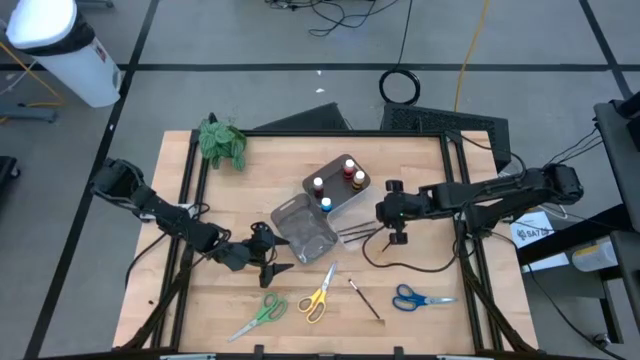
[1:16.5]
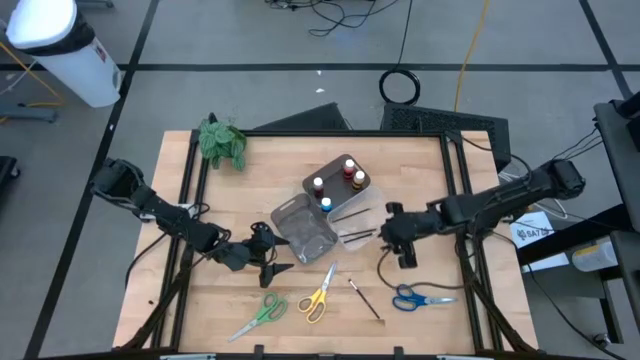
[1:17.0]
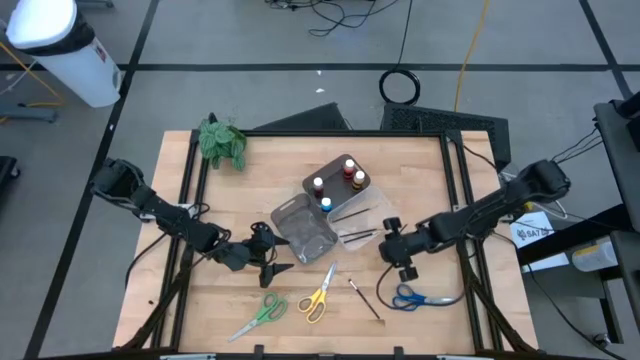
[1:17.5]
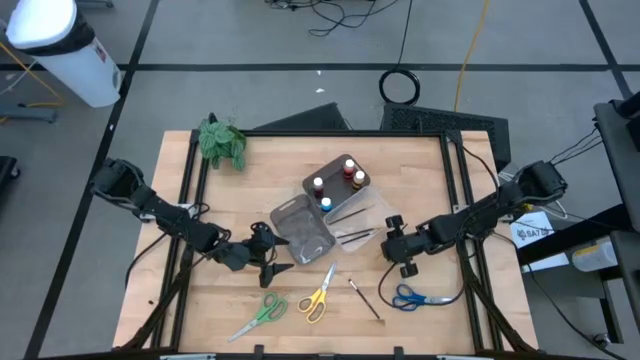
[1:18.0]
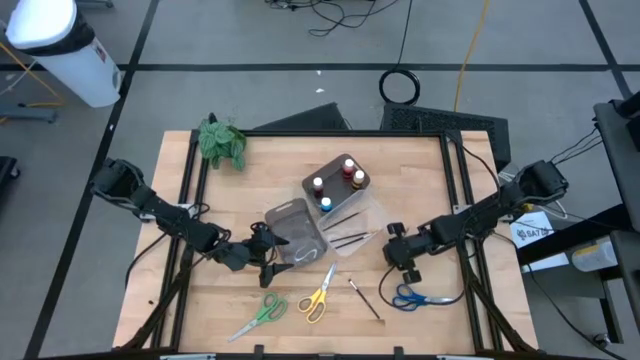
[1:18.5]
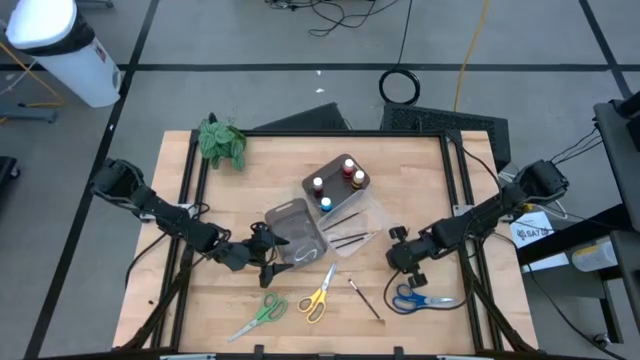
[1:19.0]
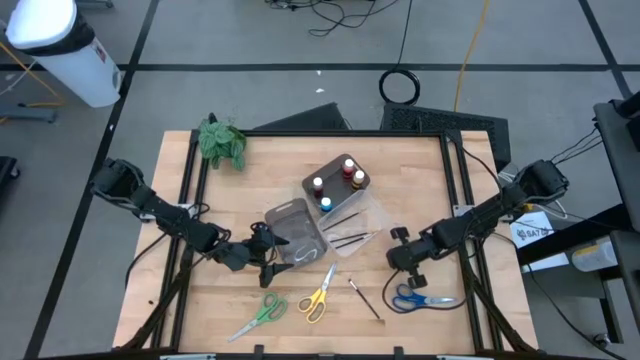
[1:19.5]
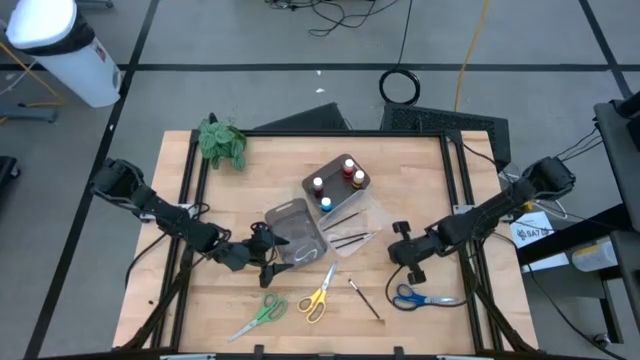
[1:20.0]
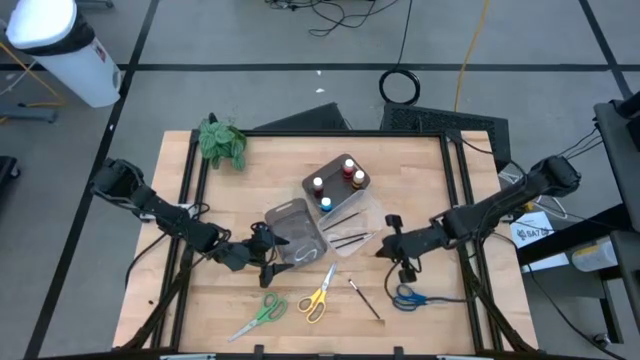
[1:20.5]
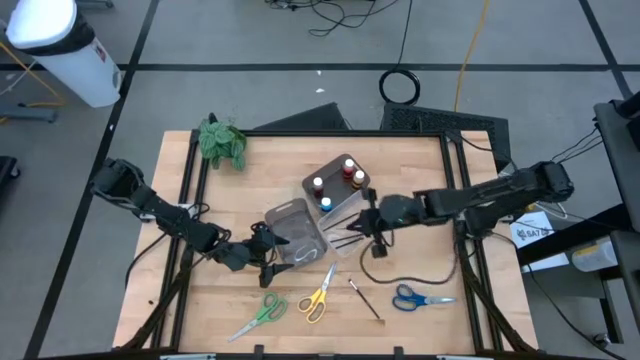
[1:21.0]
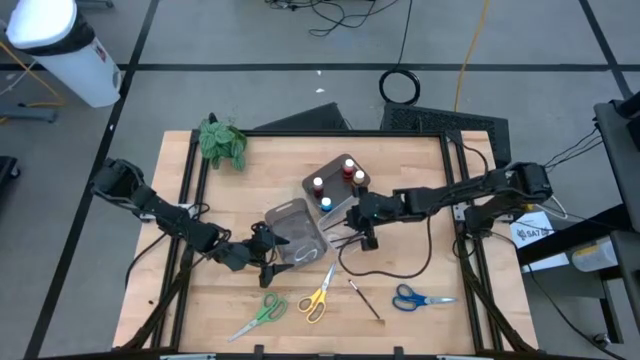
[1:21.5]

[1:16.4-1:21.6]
Task: Pick & Place Paint Supplies
Put the gold paintbrush into the transparent bin

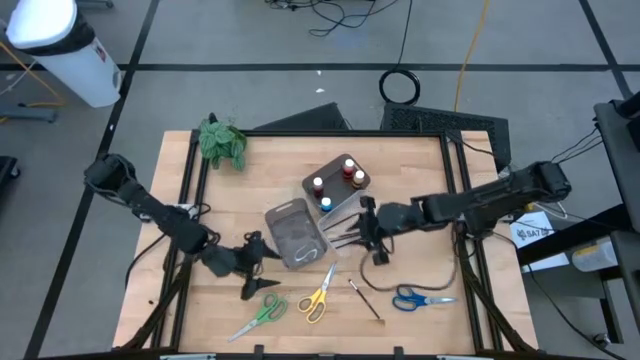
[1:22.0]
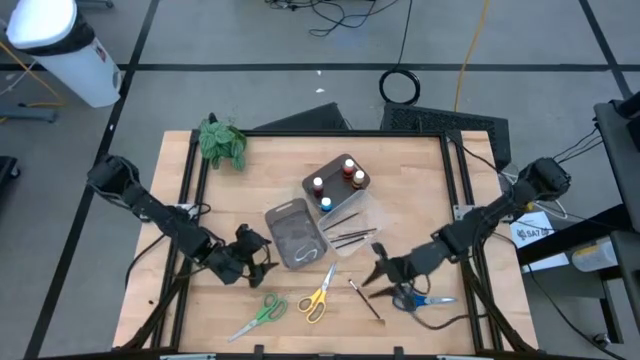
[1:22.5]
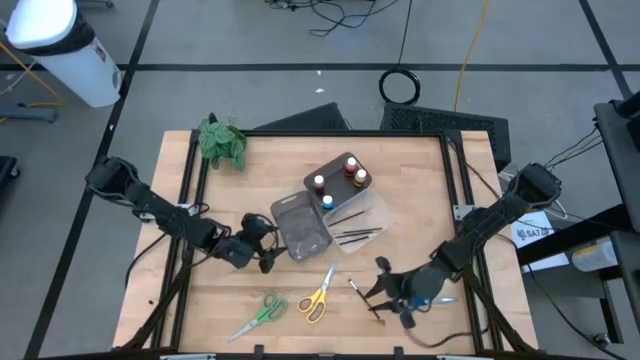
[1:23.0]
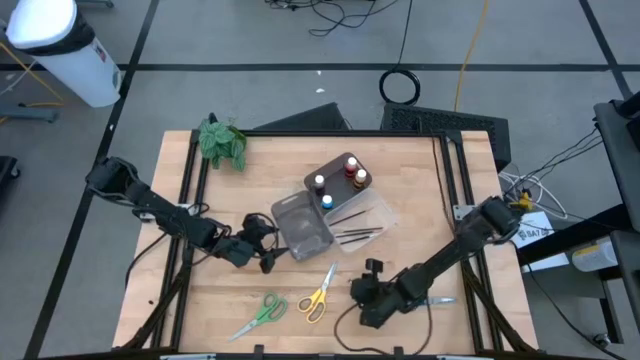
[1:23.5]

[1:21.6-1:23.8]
Adjust the bottom black bin

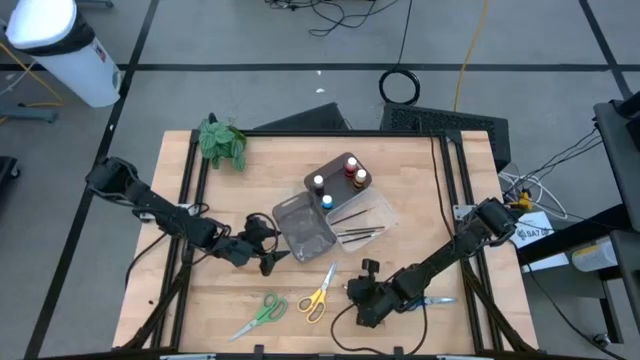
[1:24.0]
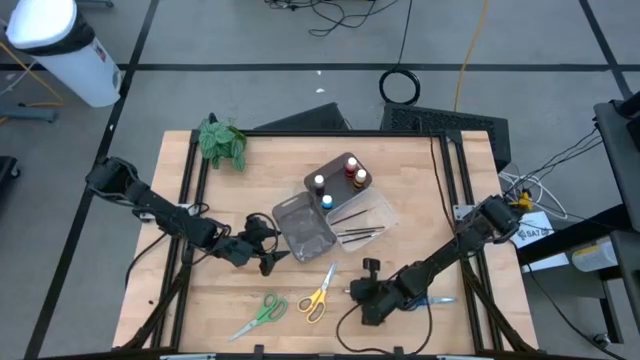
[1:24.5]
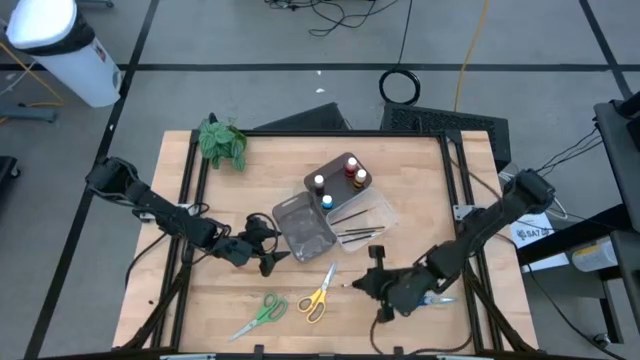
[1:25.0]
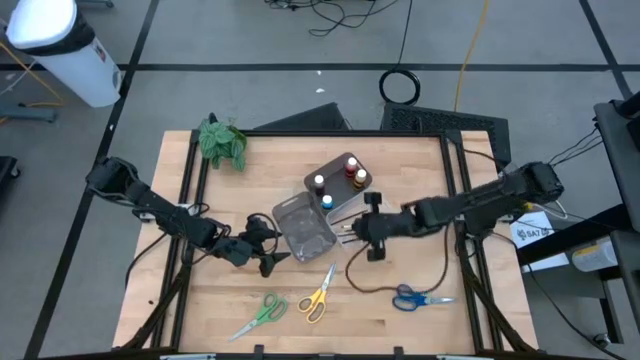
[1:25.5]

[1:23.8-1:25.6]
Put the silver paintbrush into the transparent bin

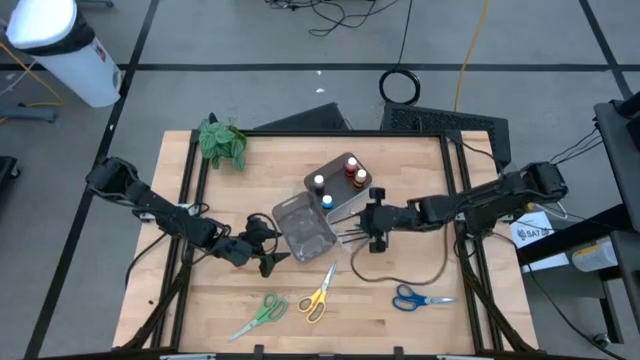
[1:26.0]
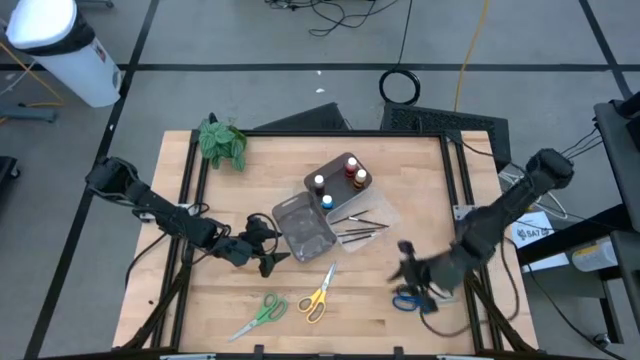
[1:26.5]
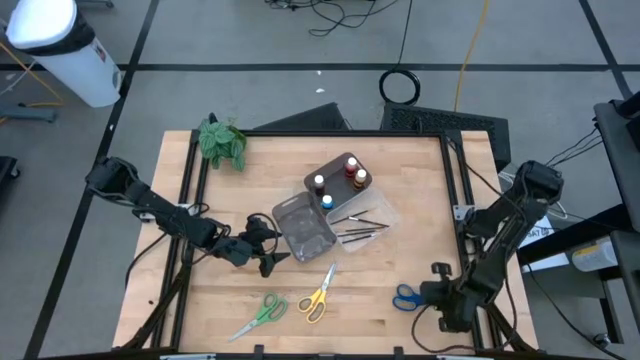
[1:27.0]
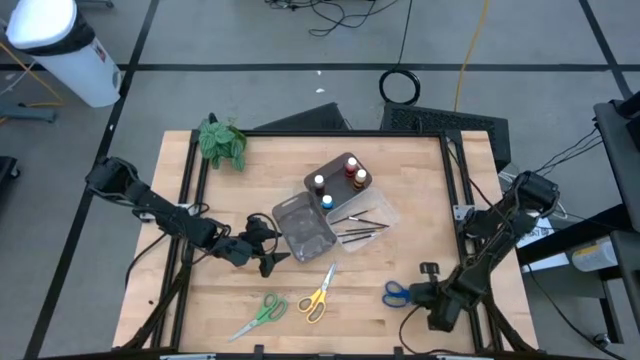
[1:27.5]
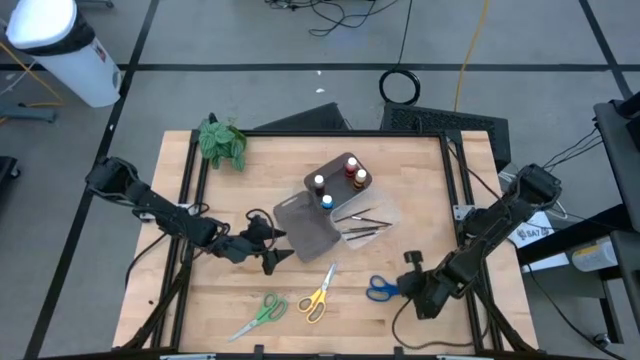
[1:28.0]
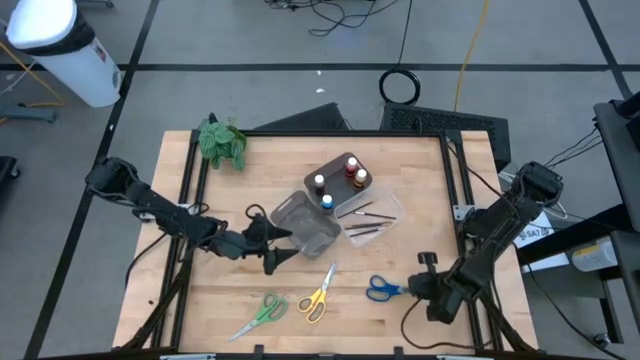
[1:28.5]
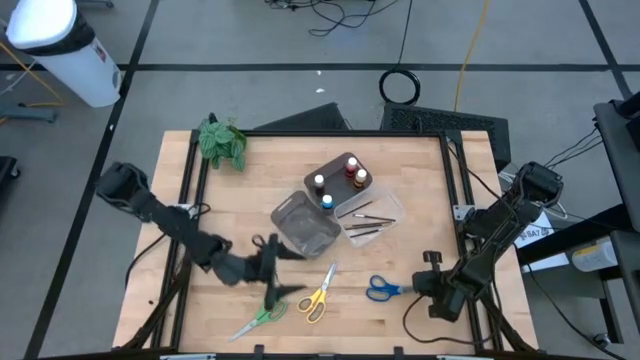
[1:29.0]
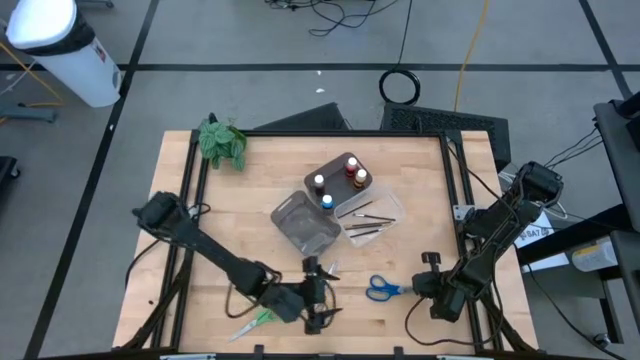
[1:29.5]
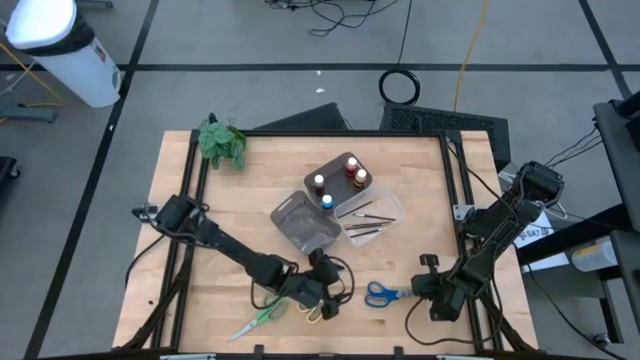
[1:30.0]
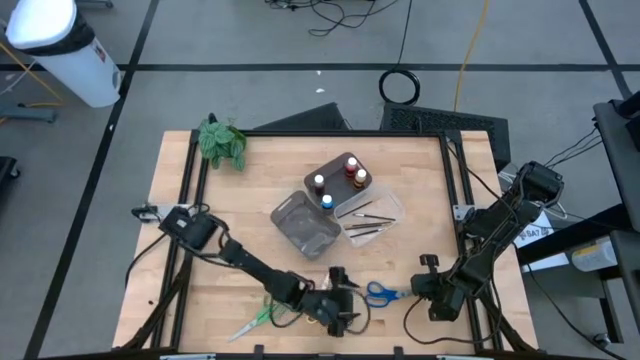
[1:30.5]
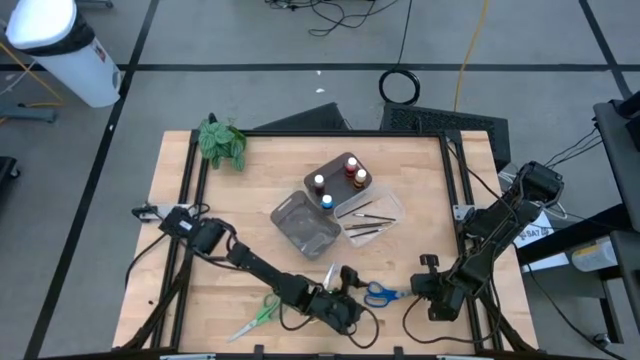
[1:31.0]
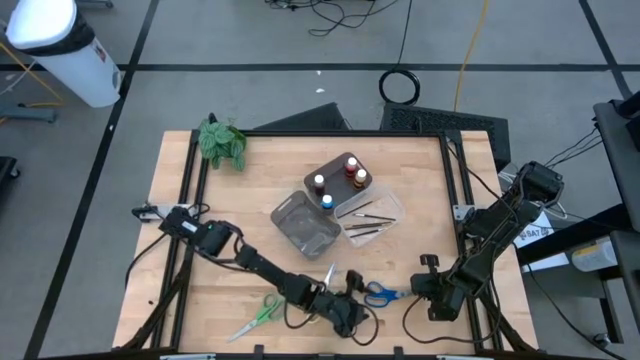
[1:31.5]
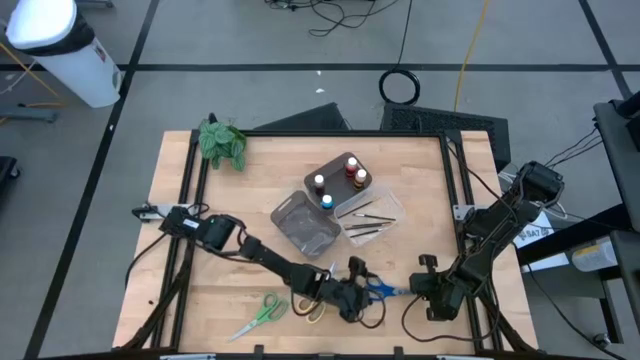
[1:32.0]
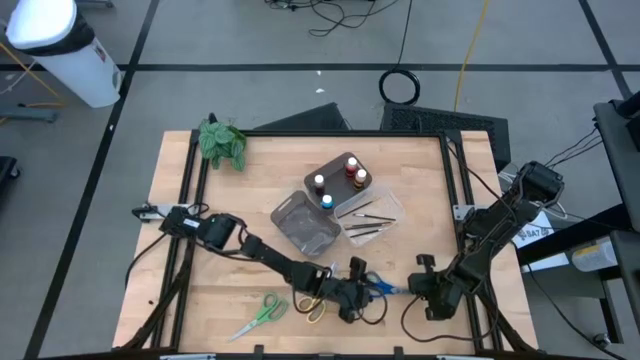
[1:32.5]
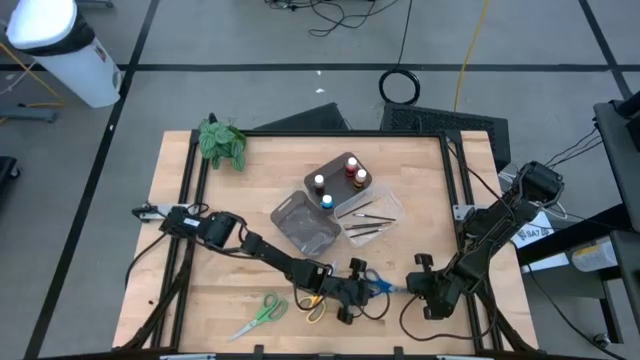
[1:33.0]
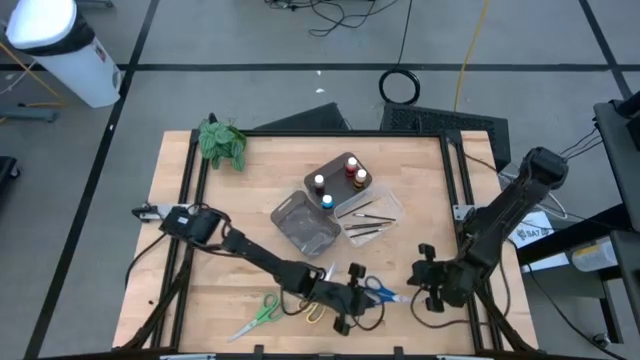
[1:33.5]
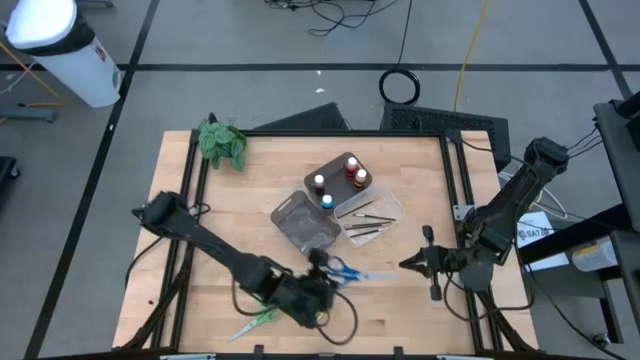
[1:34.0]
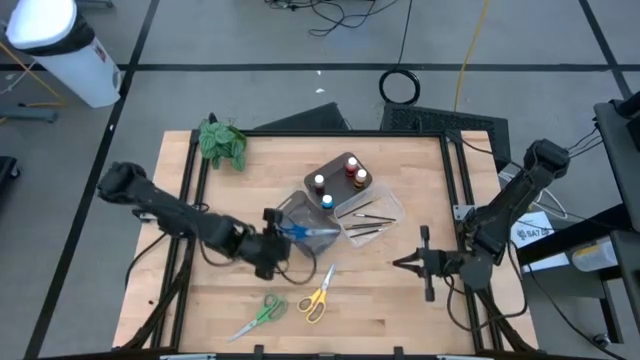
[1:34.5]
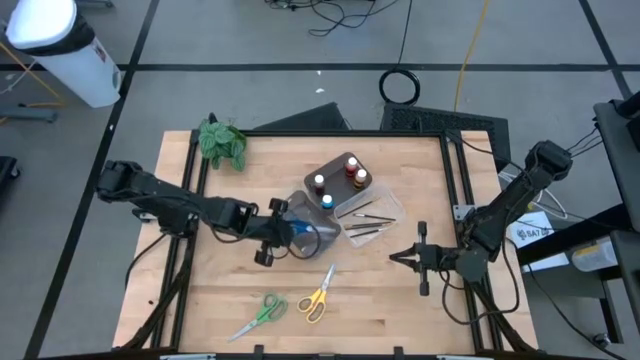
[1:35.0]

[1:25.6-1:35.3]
Put the blue scissors into the bottom black bin
